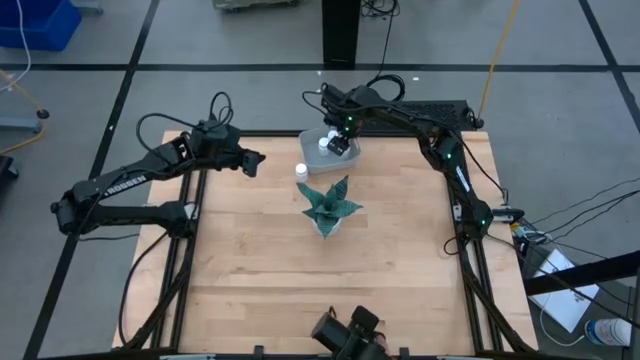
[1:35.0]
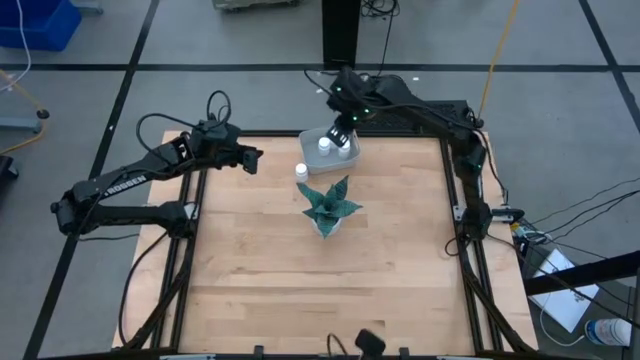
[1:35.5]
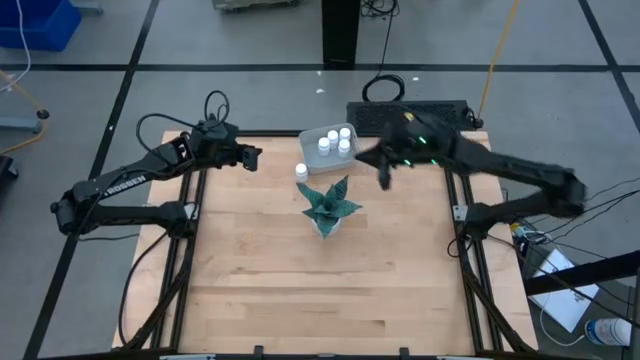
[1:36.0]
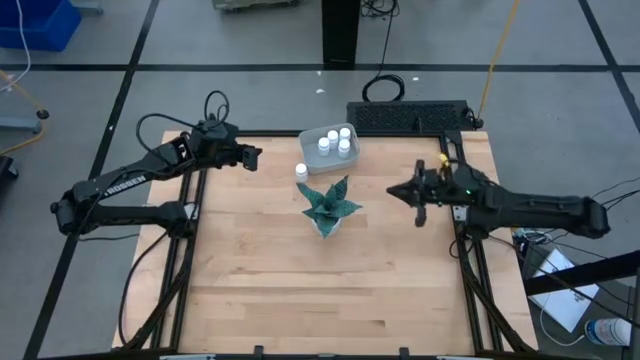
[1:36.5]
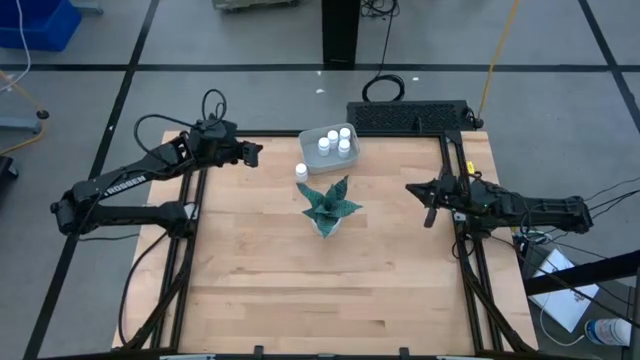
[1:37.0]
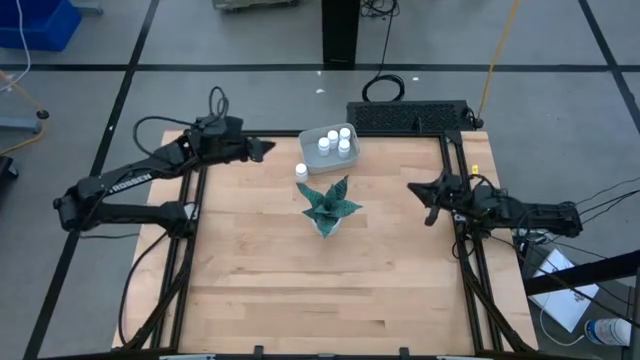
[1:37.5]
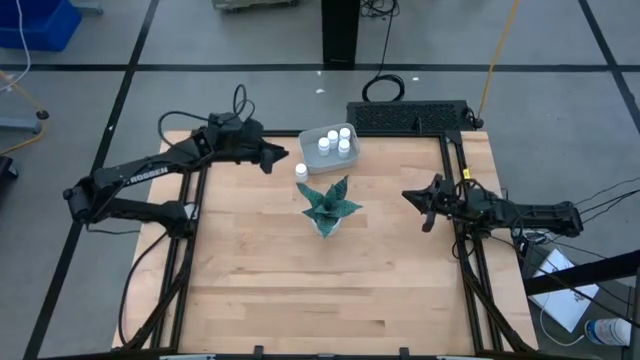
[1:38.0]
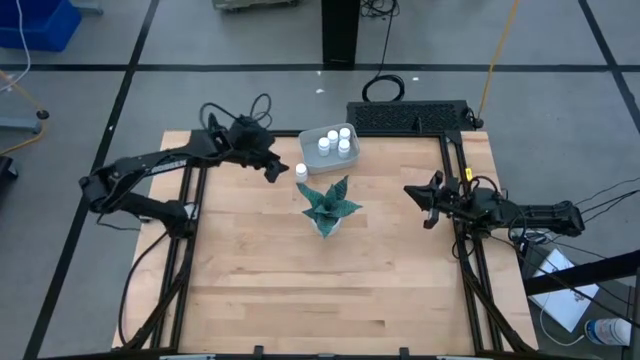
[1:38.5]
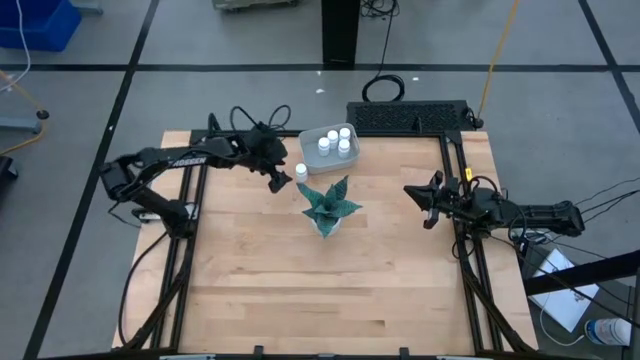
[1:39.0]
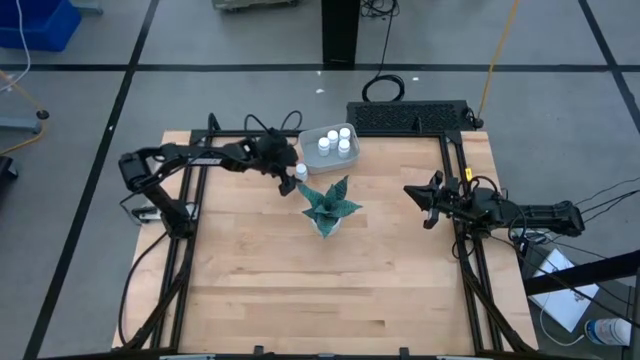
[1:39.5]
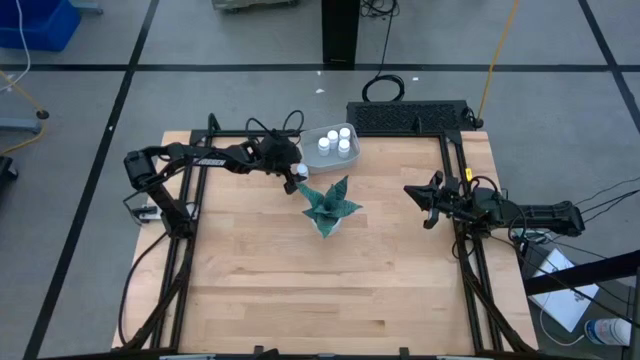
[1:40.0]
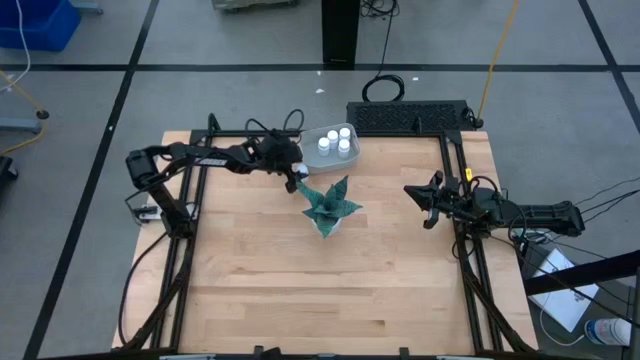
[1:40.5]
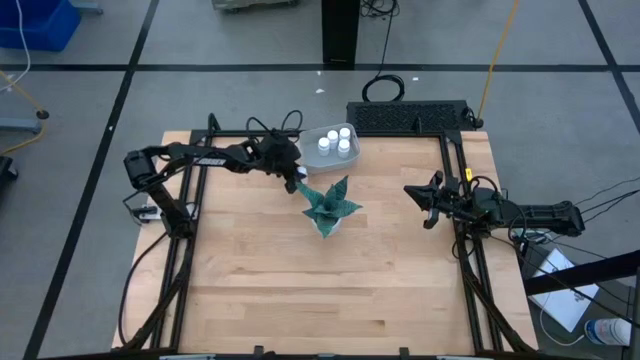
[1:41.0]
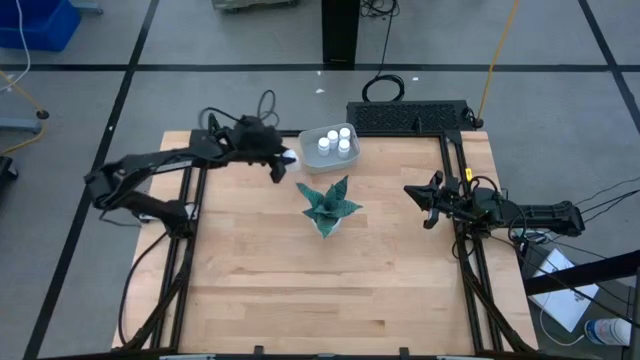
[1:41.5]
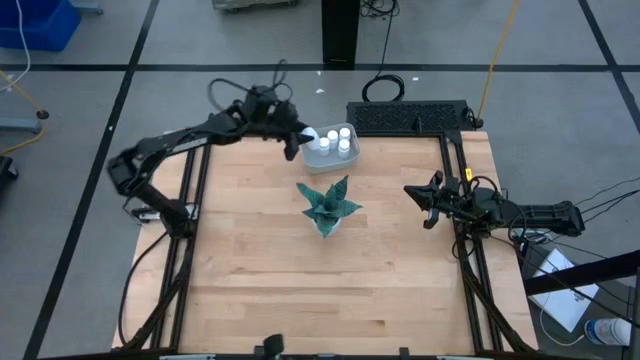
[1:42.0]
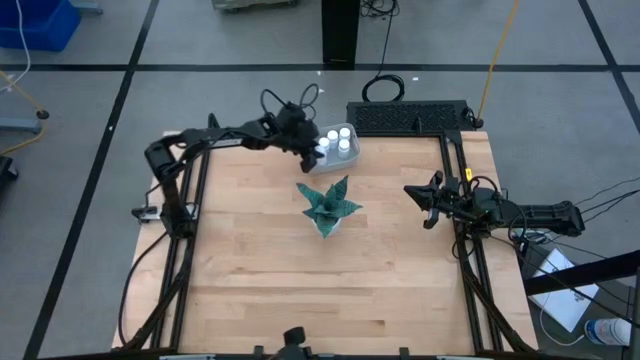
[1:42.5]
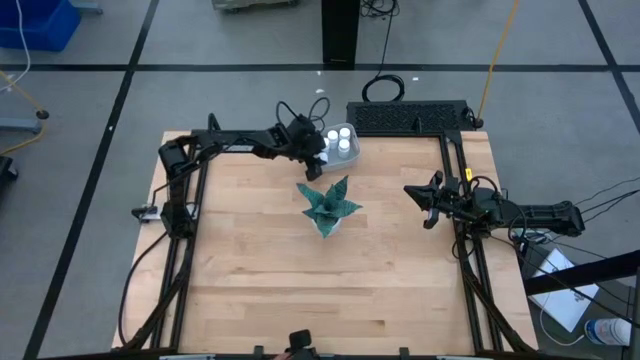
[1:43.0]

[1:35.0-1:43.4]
Task: Pick and place pill bottles into a basket
Put the white medicine bottle into the gray bin

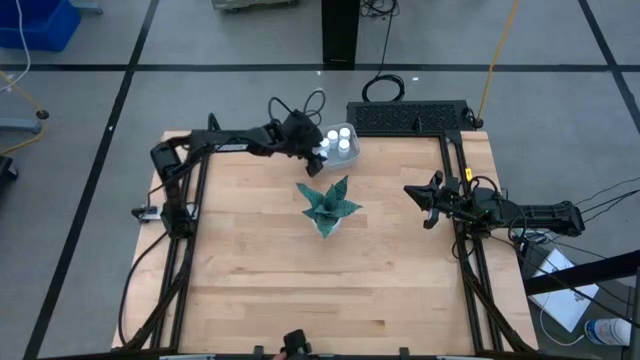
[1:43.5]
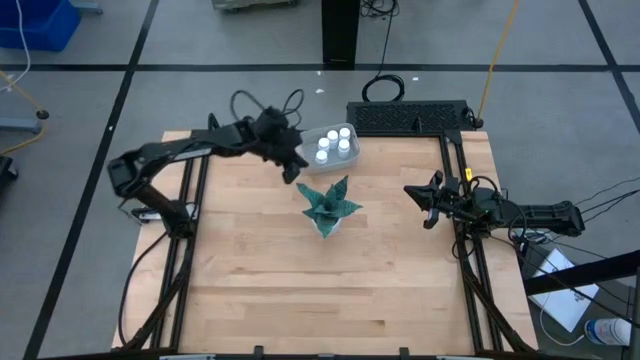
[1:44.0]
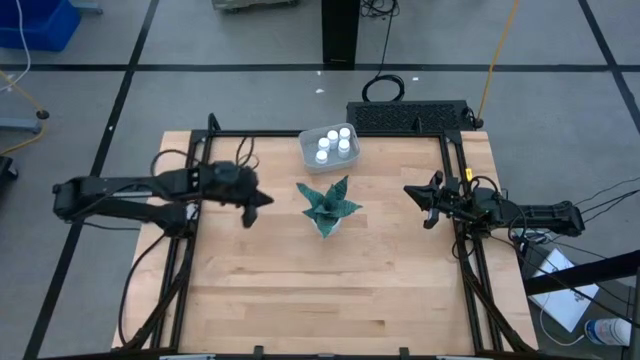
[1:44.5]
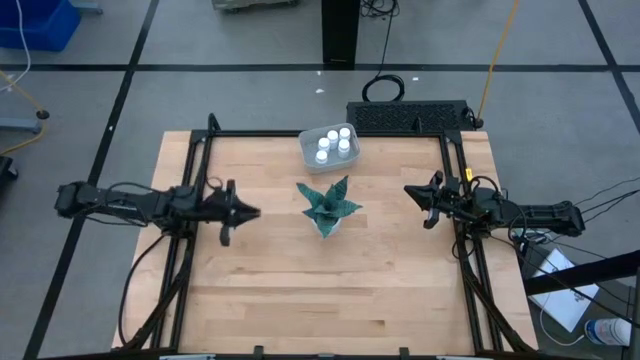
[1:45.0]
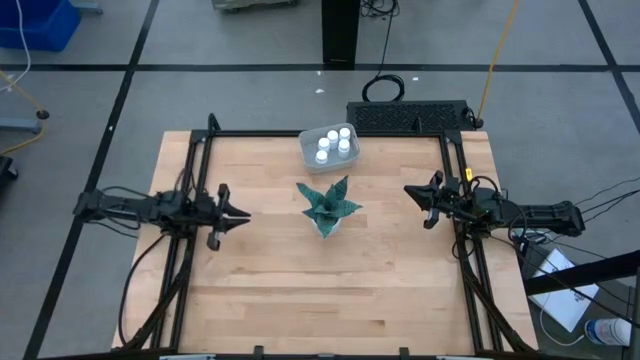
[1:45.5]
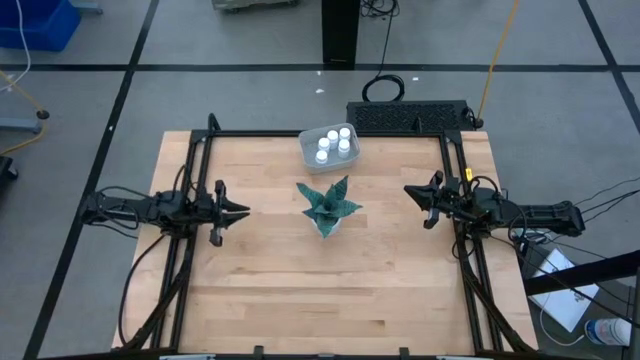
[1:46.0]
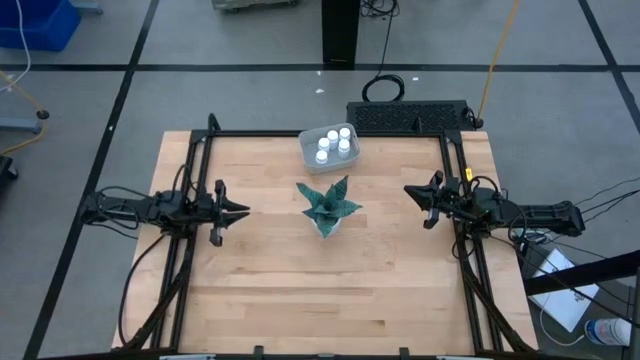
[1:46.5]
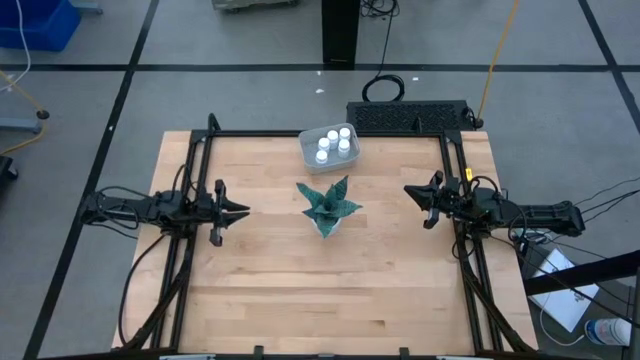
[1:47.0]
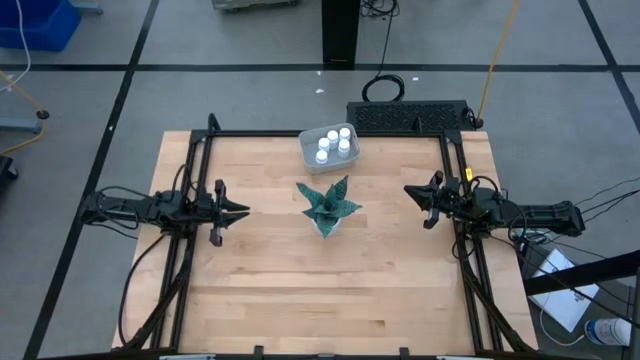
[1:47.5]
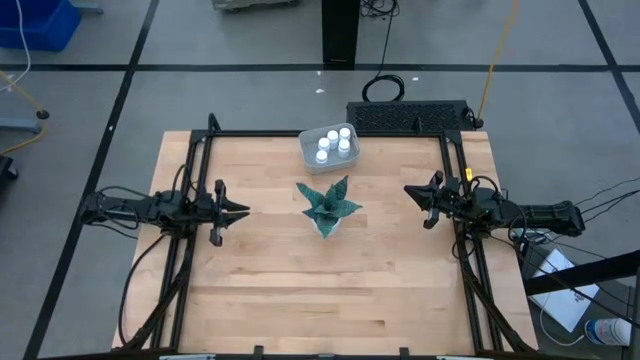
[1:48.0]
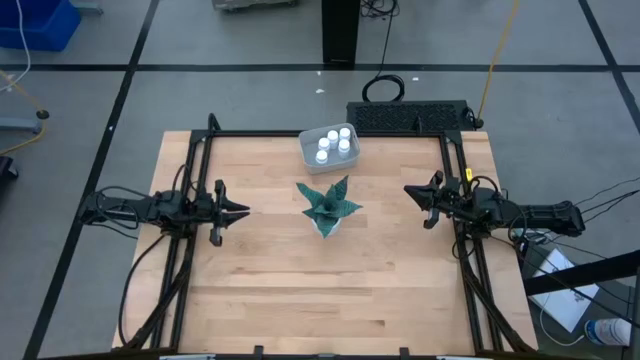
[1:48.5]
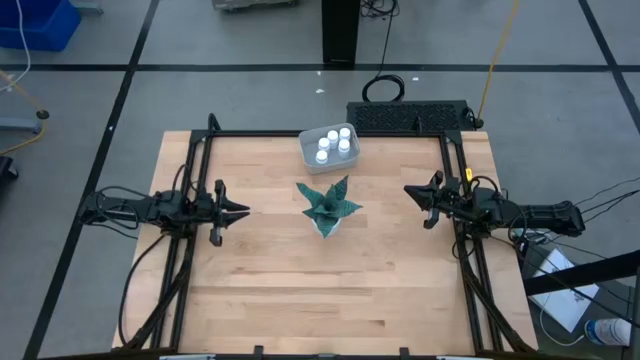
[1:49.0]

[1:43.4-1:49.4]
Return to Home Position

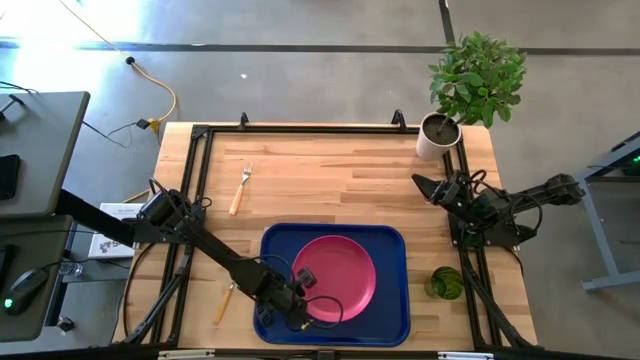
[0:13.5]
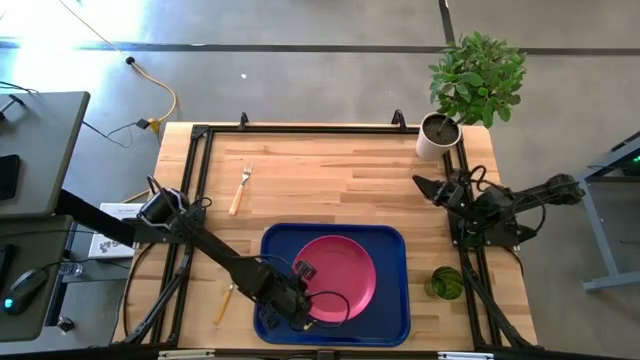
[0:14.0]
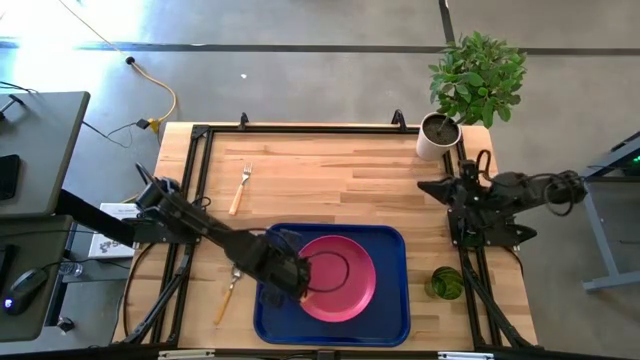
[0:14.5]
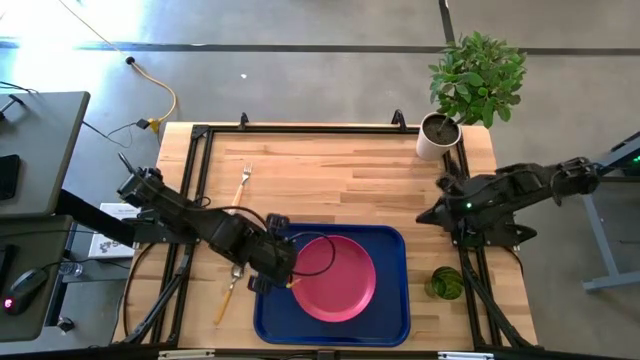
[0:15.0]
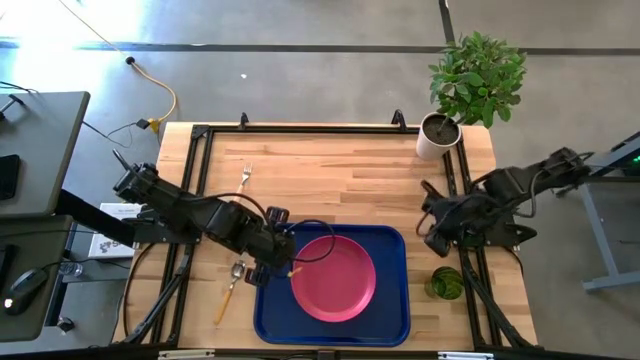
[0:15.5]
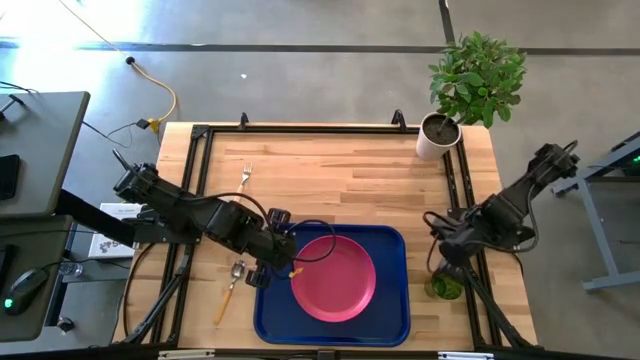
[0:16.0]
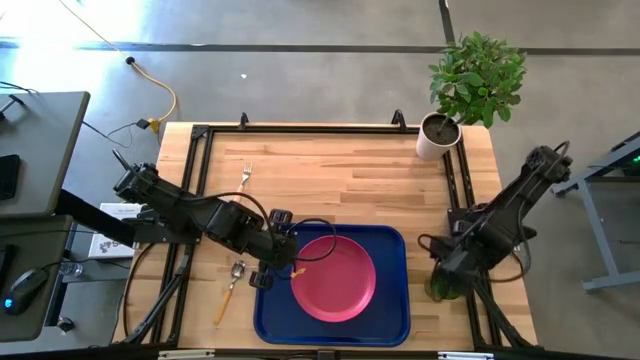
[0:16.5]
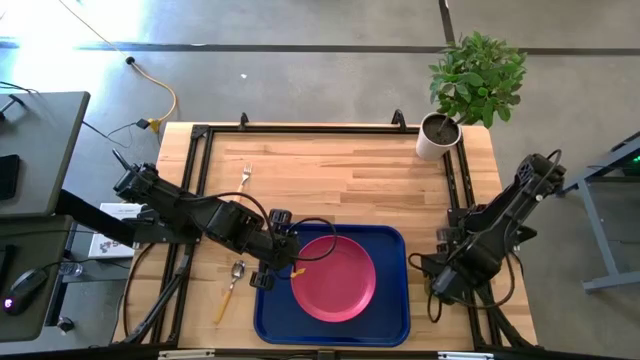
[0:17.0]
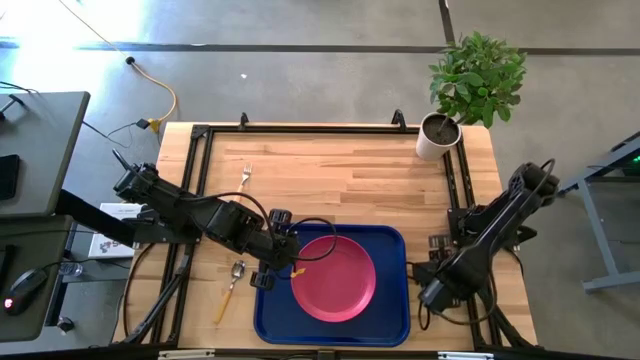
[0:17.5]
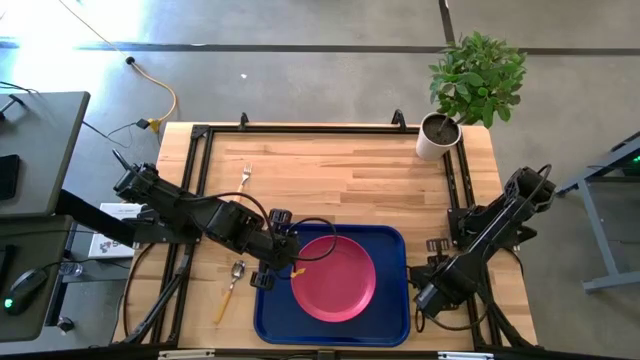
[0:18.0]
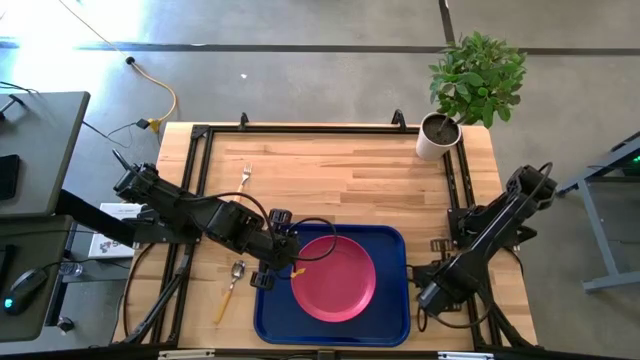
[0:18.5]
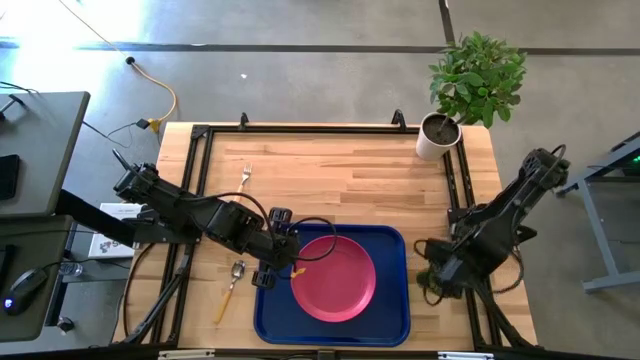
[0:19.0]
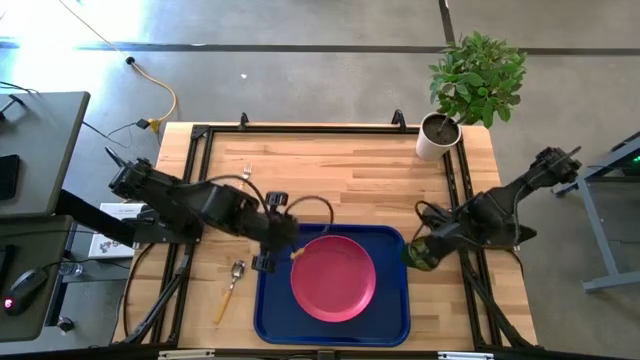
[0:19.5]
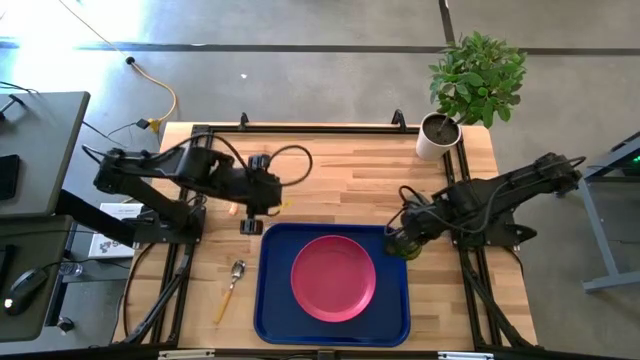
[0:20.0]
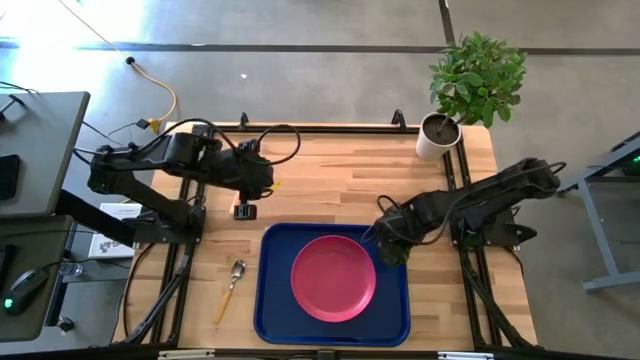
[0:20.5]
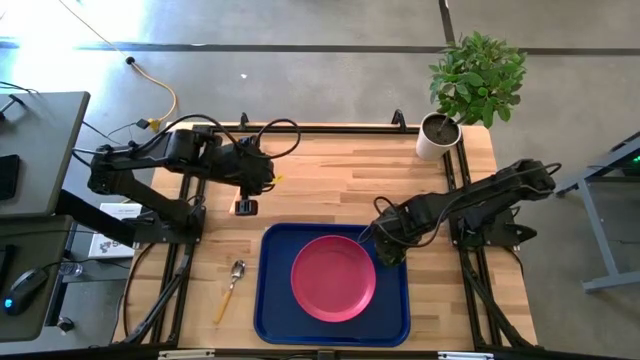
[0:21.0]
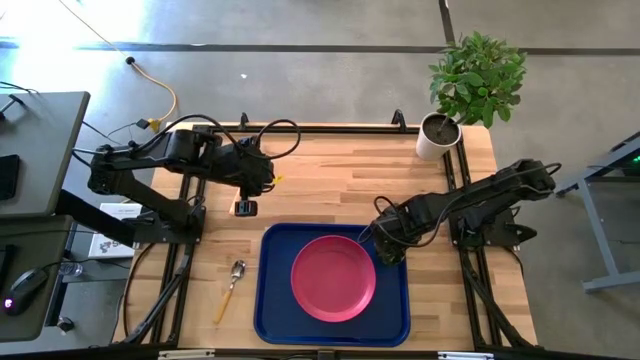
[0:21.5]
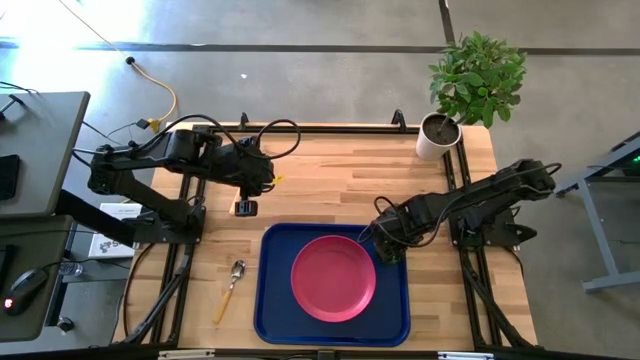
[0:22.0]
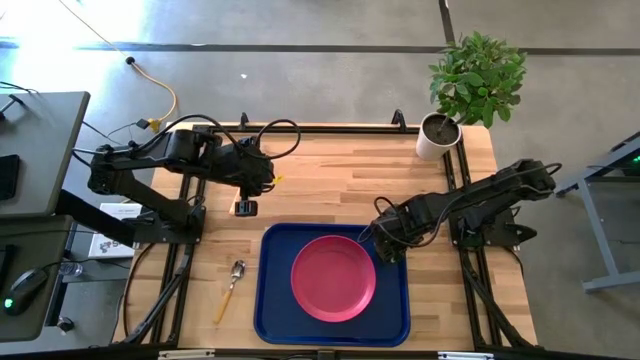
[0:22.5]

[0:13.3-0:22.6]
Task: Pick and place plate/cup/fork/spoon on tray
Put the green cup on the blue tray to the top right of the pink plate
